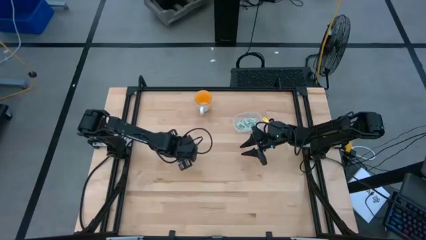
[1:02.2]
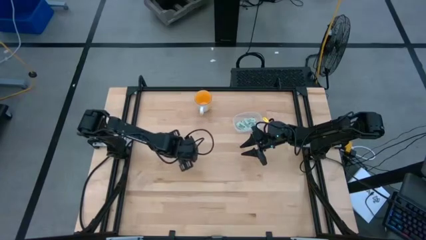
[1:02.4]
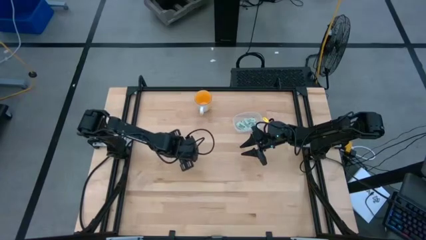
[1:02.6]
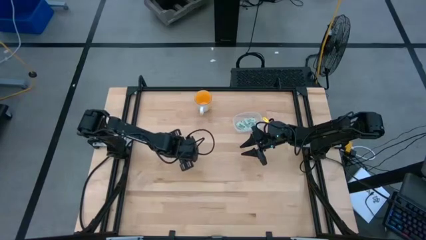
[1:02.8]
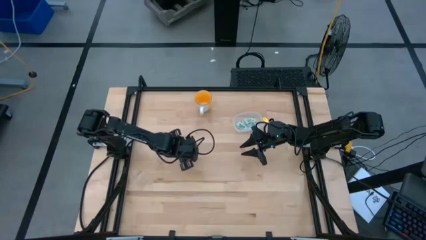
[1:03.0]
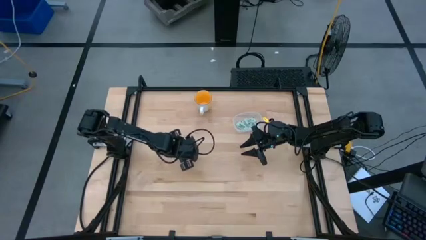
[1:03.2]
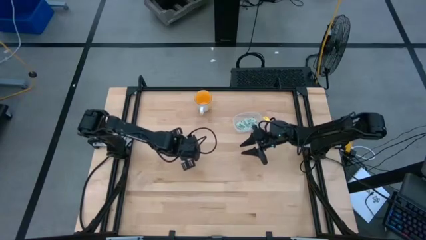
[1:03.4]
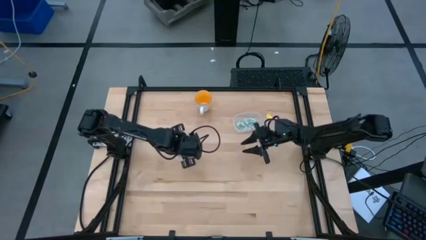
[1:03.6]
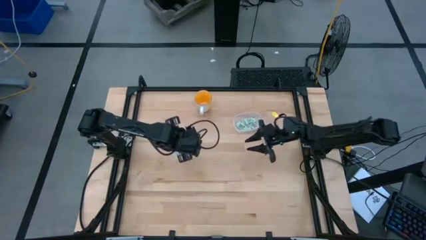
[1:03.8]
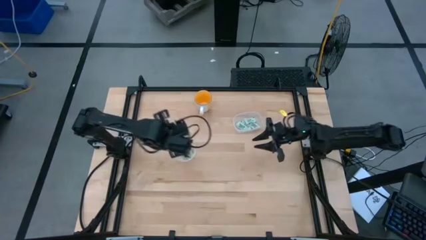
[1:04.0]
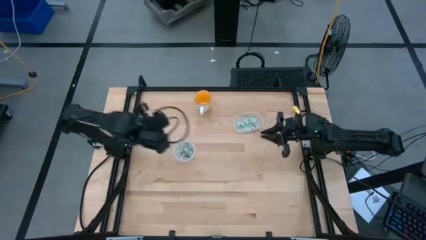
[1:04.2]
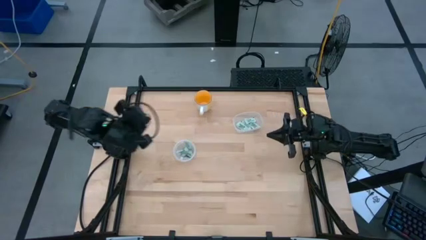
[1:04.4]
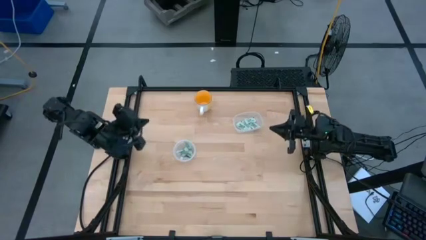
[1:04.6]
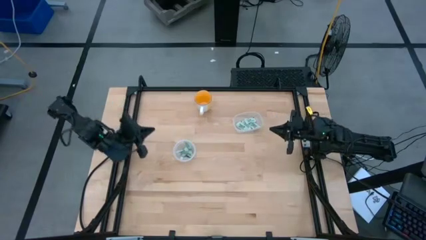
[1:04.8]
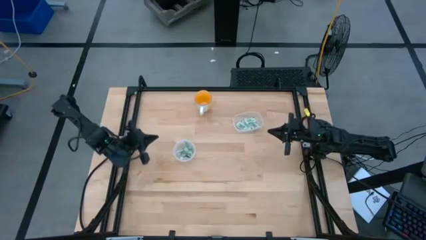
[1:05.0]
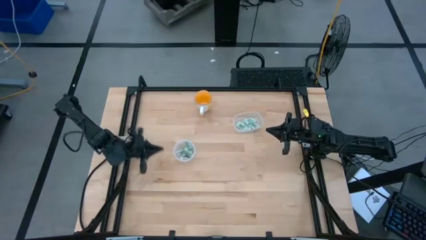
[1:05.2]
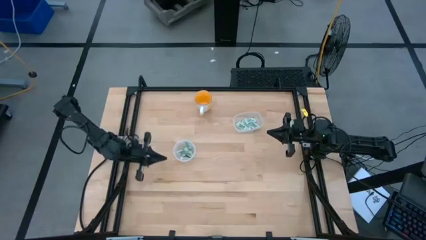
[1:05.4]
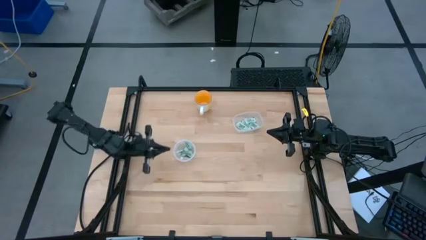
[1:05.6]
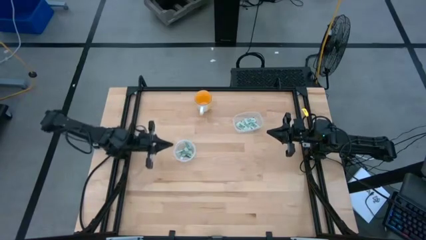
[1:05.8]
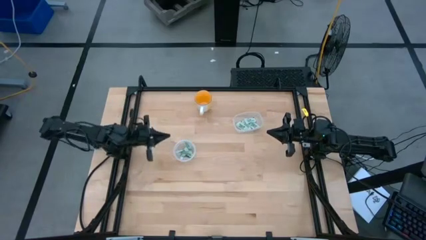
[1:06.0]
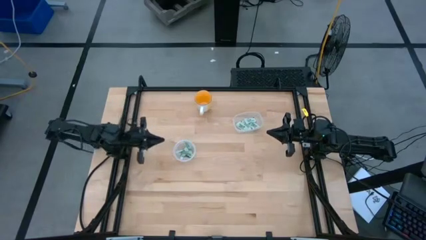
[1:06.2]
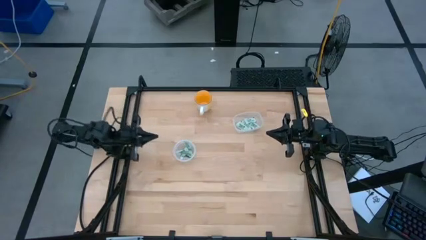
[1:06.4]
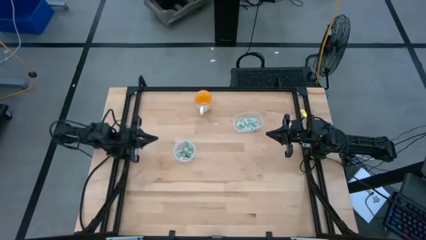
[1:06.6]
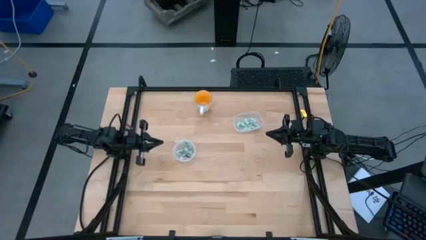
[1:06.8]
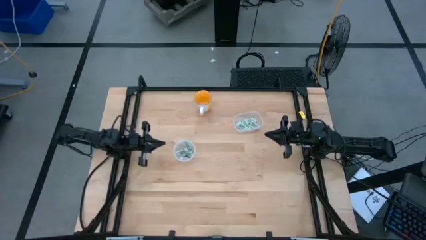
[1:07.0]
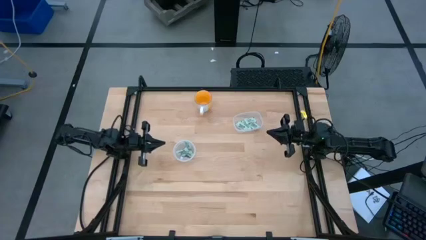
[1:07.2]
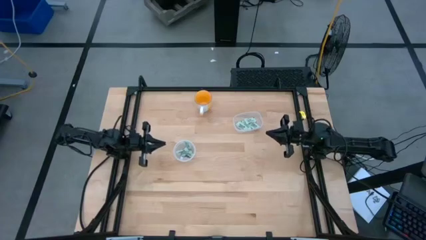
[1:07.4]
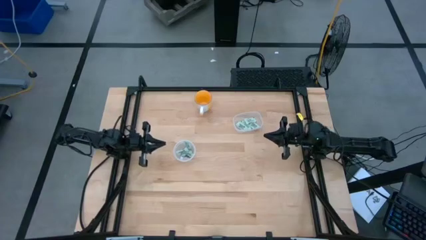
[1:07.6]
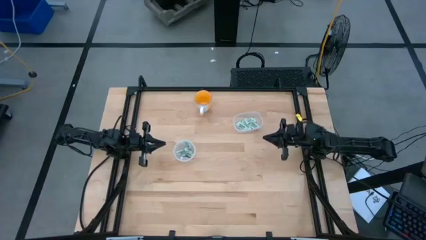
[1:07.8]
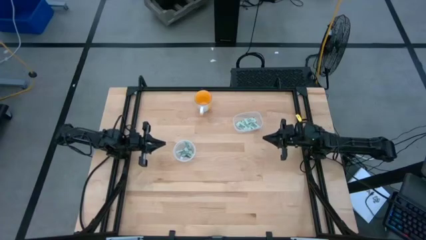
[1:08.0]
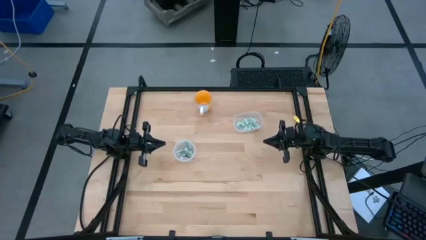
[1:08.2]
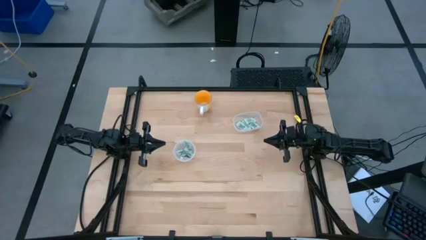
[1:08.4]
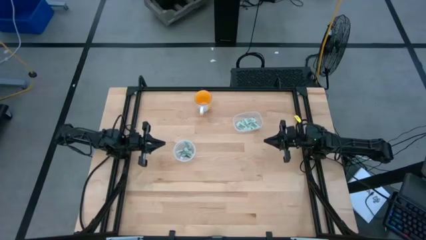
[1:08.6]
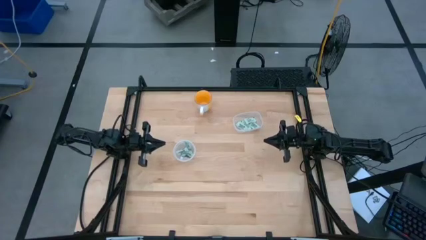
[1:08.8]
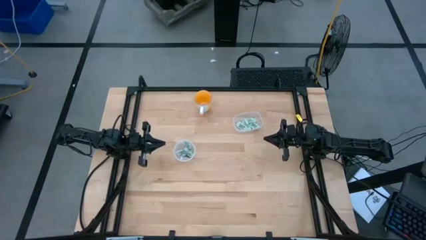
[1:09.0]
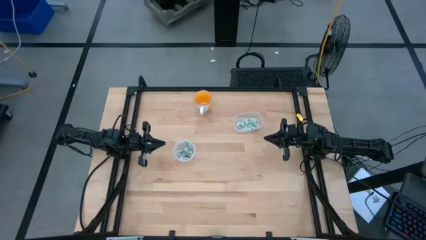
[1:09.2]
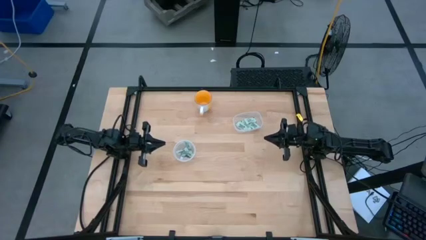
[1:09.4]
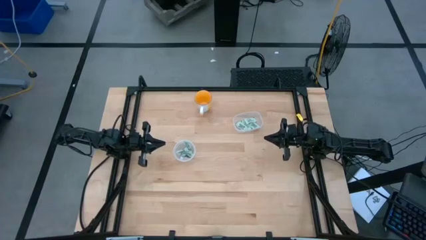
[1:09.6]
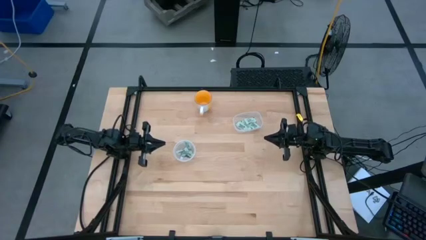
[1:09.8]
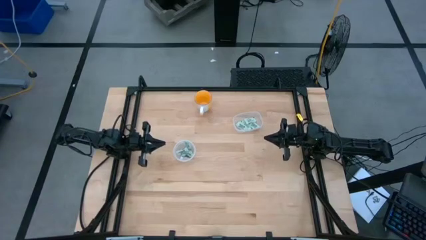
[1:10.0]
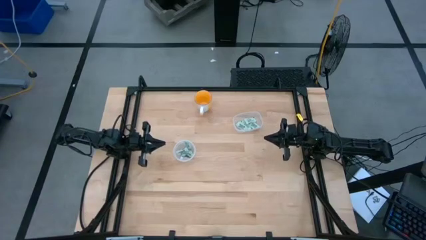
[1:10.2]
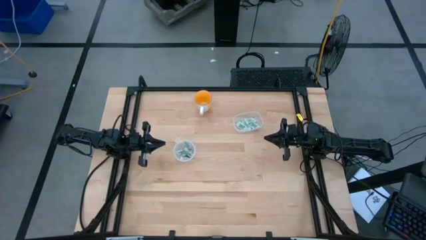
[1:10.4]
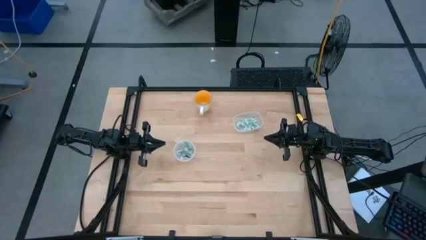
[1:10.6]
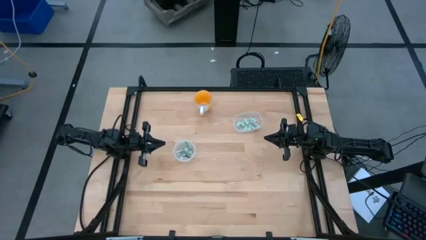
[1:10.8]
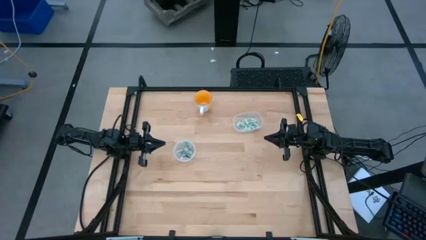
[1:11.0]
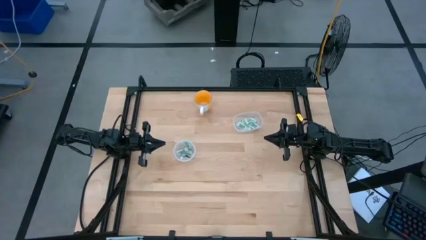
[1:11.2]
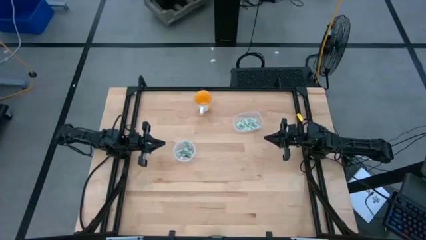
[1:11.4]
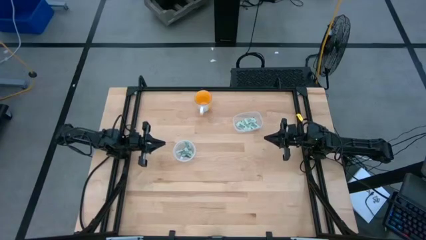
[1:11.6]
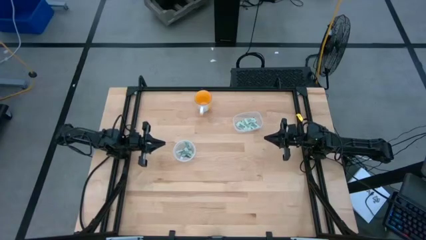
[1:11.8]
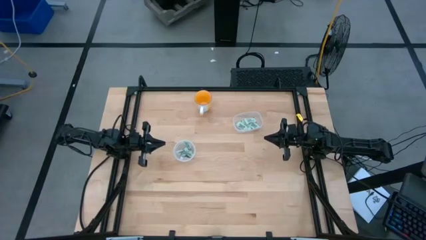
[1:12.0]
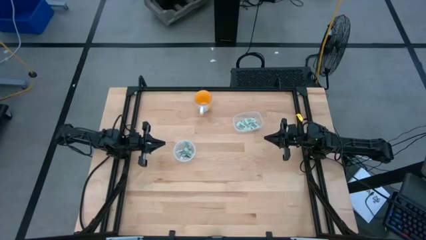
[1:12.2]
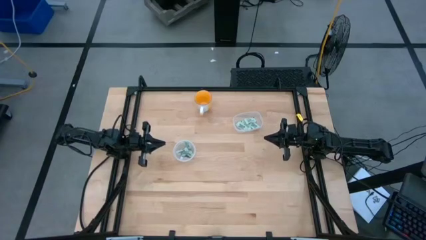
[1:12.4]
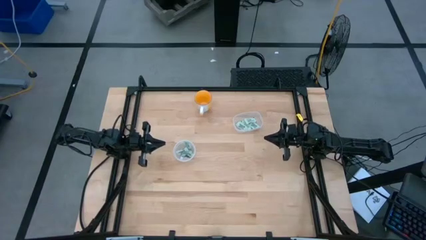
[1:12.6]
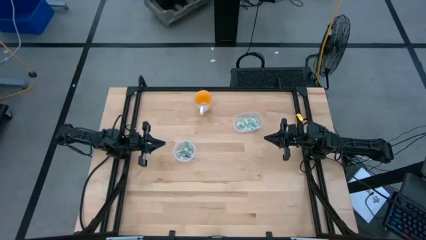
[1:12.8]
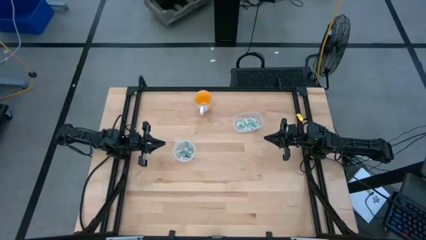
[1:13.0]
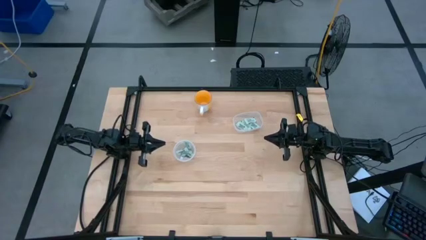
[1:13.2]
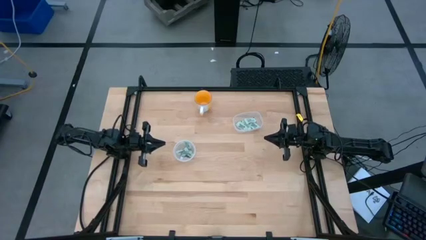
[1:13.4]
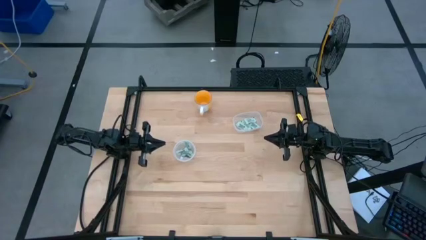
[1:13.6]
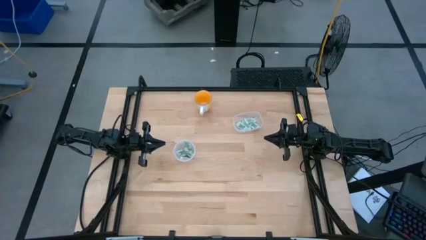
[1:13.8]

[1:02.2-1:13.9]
Task: Pick and place Stevia / Truvia into bins
Return to Home Position

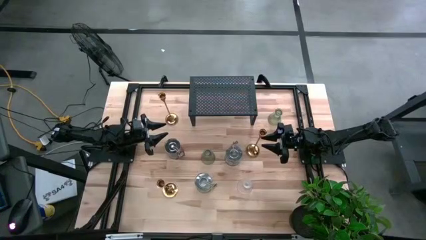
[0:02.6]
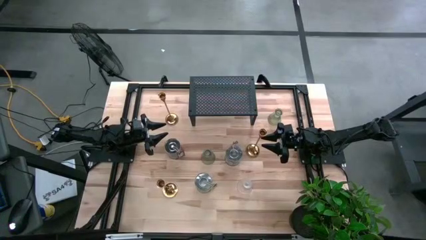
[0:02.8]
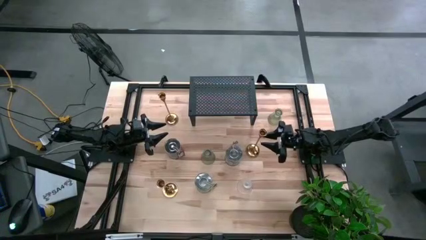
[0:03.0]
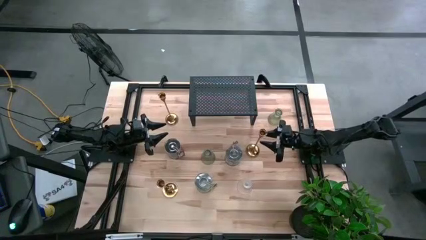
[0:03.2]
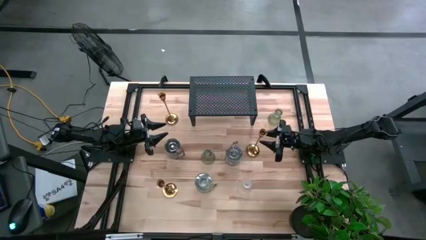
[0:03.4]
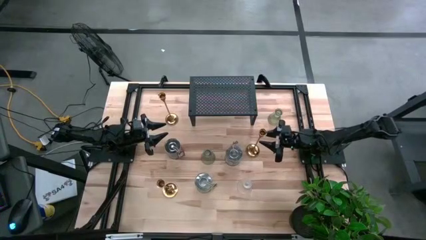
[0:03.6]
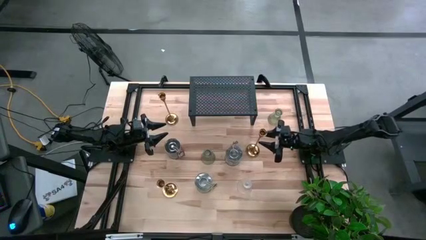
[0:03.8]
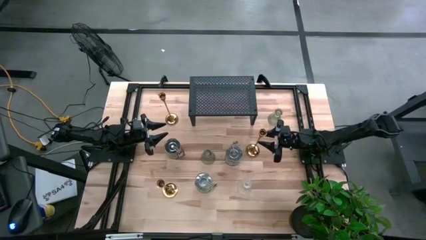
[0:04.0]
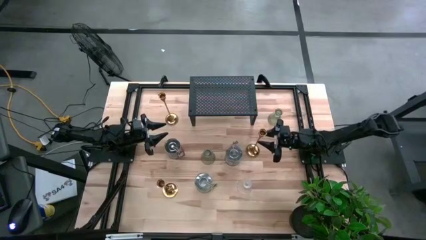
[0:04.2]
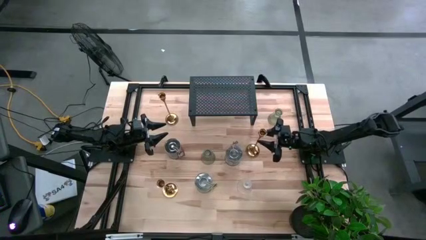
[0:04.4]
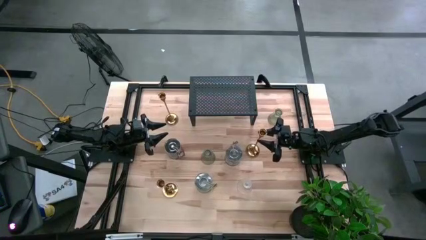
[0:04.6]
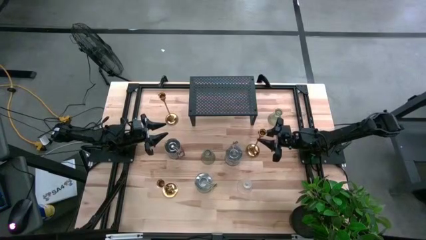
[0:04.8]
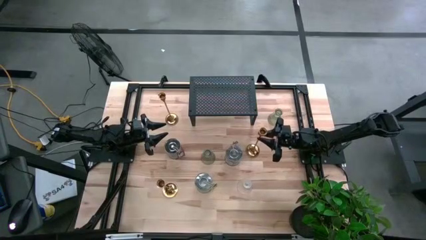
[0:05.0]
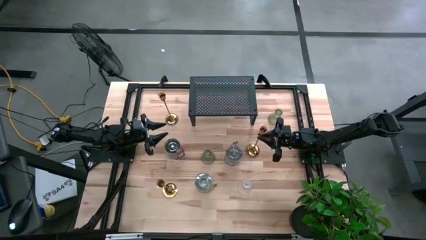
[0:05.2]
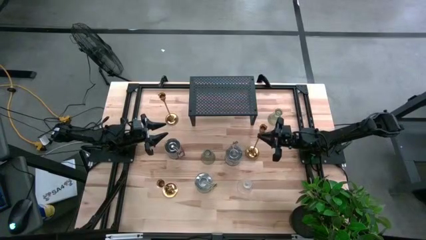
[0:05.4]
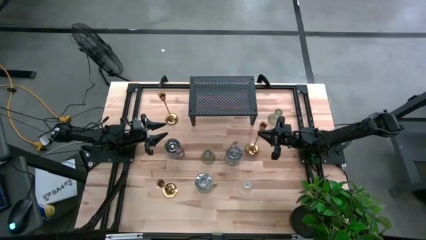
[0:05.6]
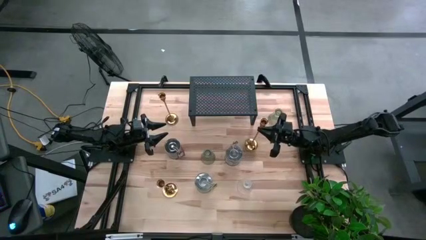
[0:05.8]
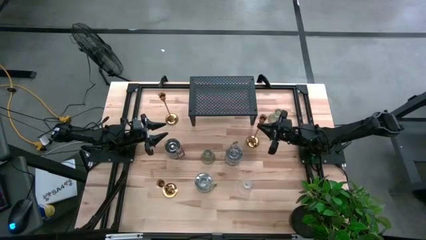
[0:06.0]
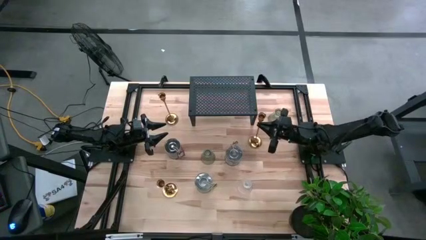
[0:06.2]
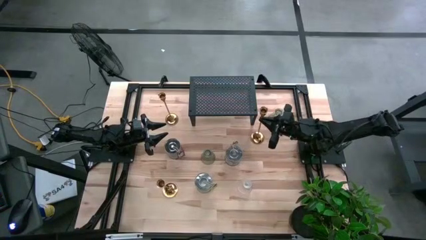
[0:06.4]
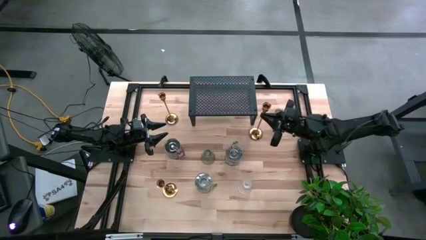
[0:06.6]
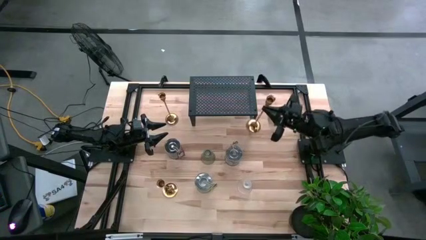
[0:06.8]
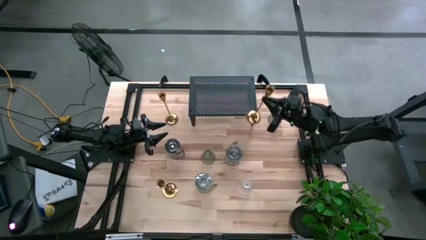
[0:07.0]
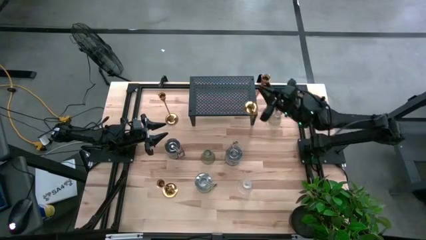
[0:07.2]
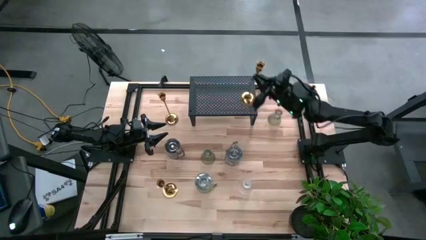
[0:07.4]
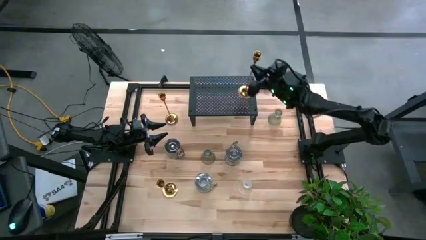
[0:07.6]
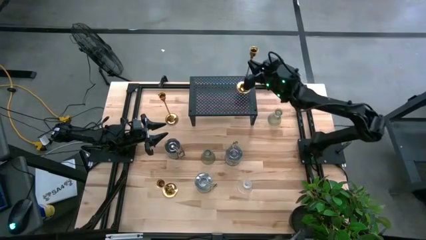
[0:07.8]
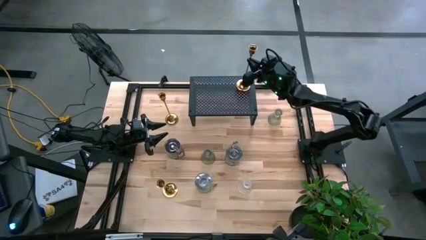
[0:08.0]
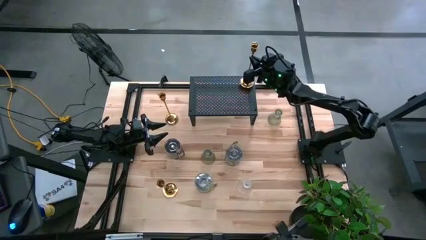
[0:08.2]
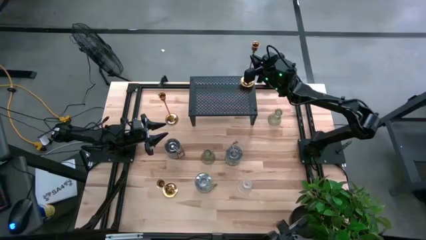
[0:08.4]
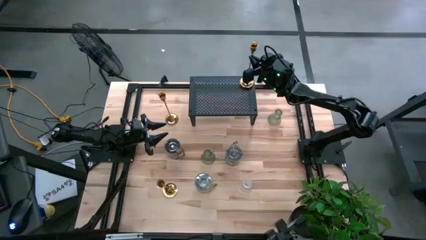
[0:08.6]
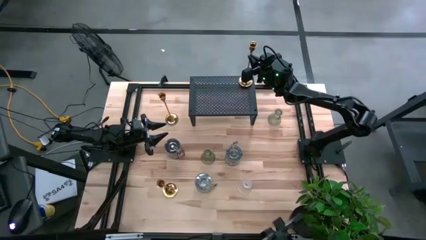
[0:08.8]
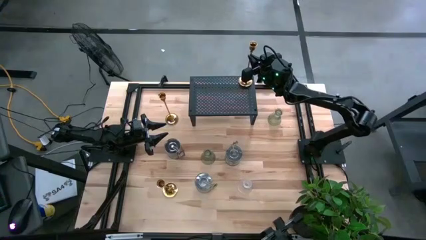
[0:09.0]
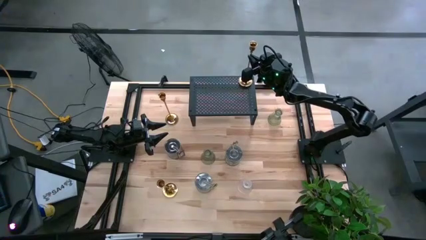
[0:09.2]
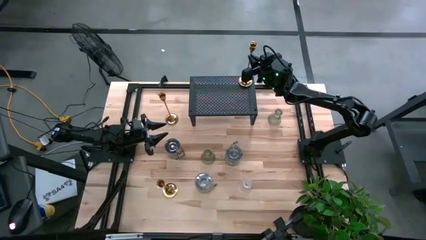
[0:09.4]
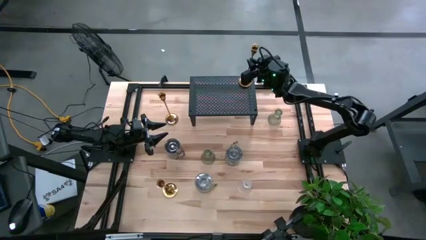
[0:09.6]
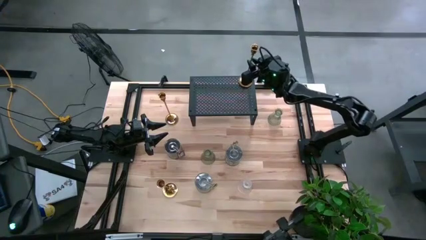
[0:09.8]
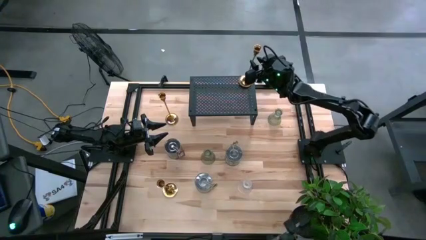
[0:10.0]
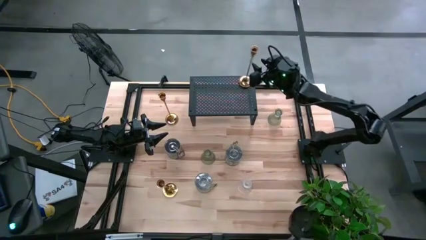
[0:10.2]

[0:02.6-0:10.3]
Task: Pick & Place candle stick holders
Put the middle gold candle holder on the shelf
